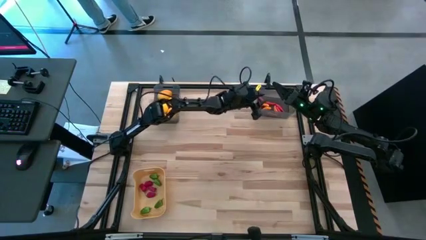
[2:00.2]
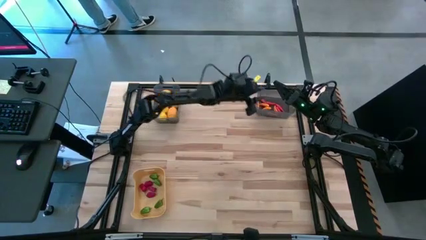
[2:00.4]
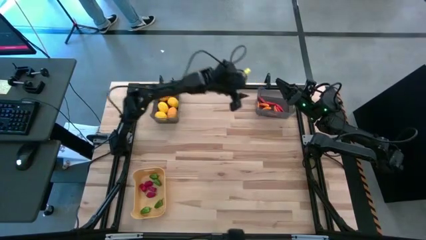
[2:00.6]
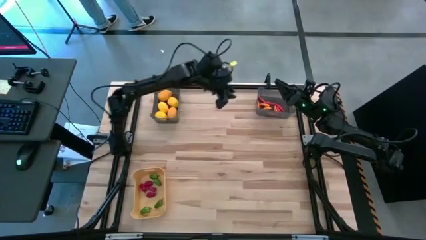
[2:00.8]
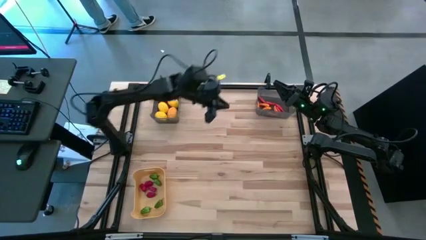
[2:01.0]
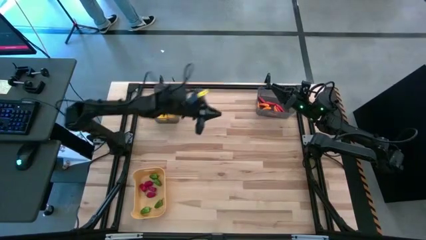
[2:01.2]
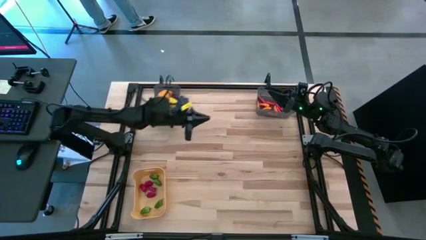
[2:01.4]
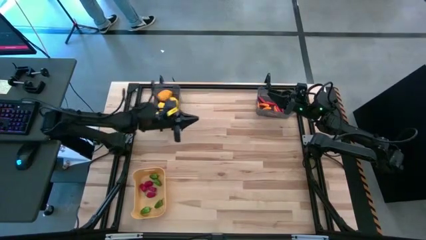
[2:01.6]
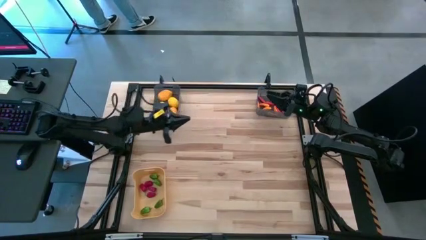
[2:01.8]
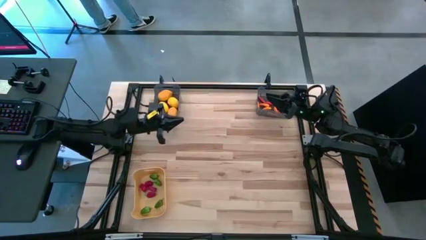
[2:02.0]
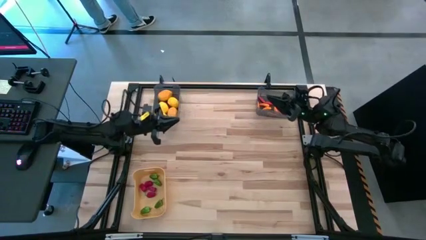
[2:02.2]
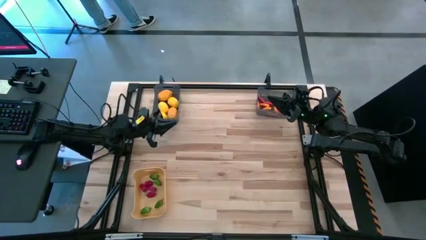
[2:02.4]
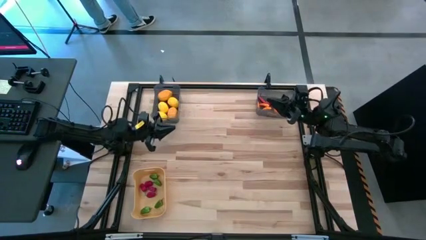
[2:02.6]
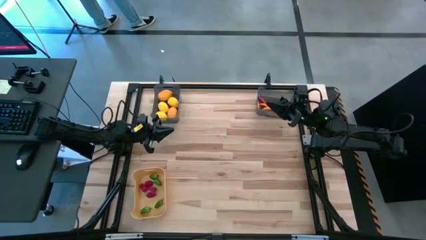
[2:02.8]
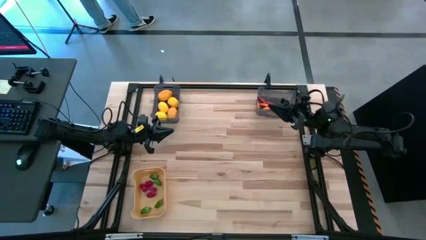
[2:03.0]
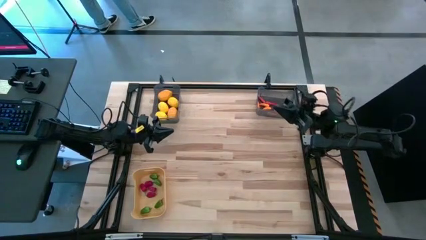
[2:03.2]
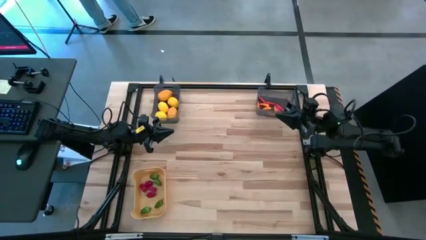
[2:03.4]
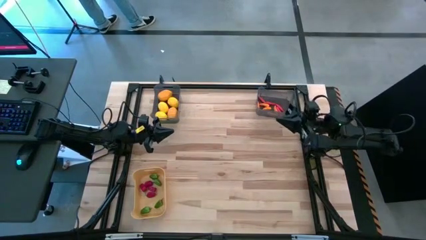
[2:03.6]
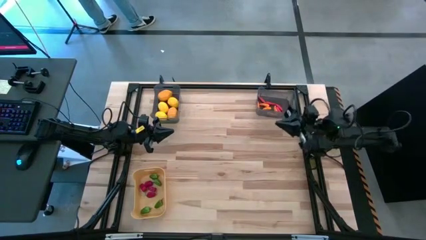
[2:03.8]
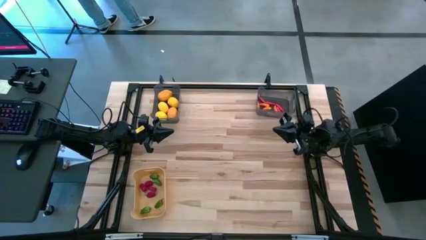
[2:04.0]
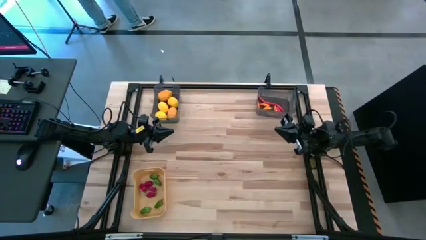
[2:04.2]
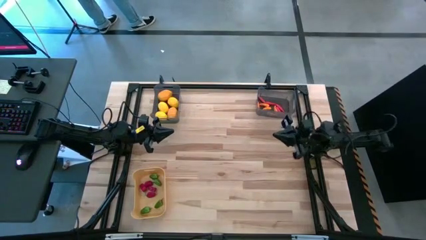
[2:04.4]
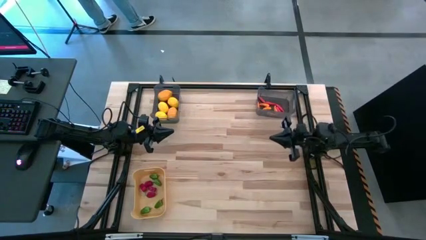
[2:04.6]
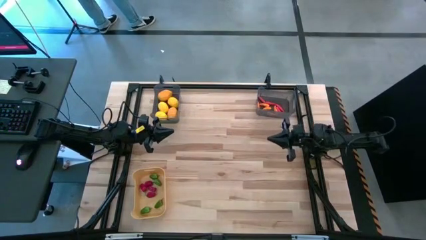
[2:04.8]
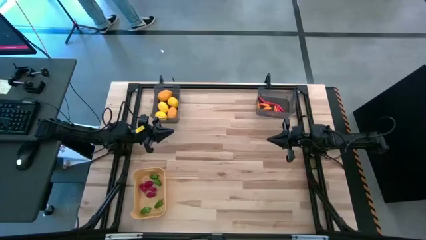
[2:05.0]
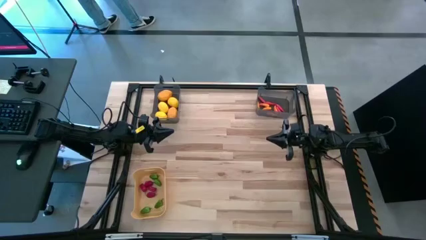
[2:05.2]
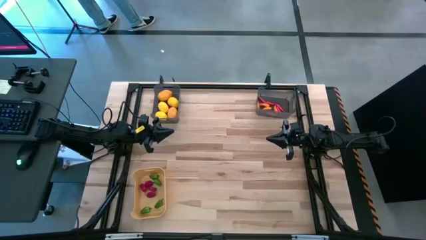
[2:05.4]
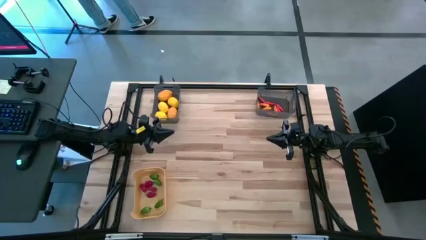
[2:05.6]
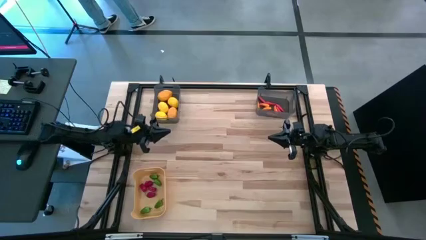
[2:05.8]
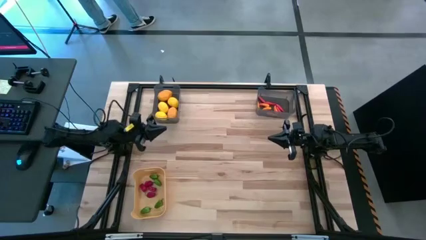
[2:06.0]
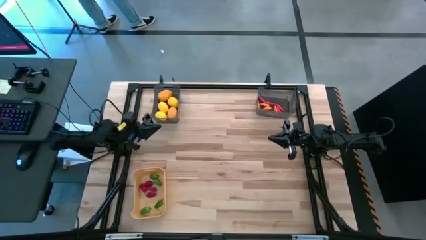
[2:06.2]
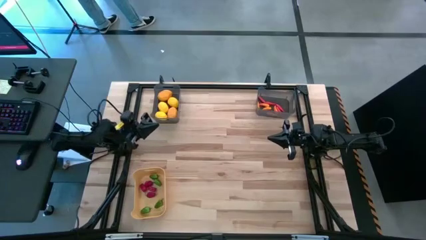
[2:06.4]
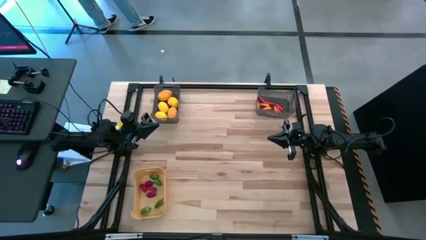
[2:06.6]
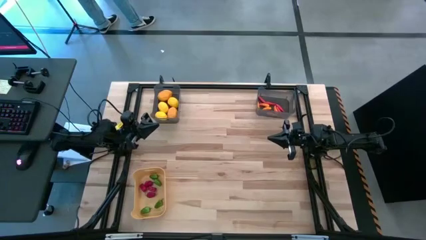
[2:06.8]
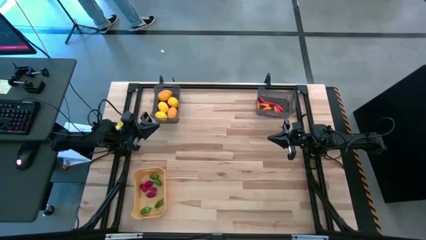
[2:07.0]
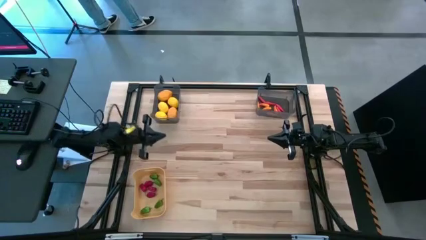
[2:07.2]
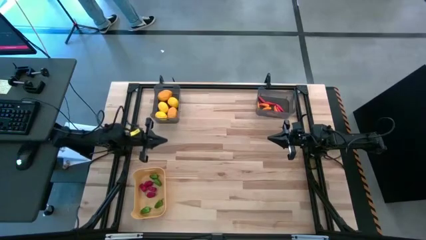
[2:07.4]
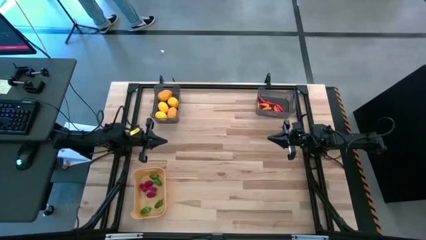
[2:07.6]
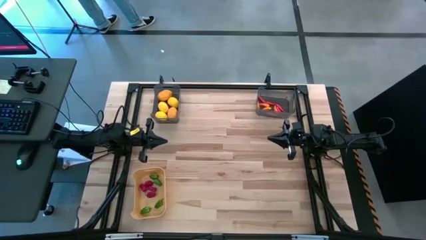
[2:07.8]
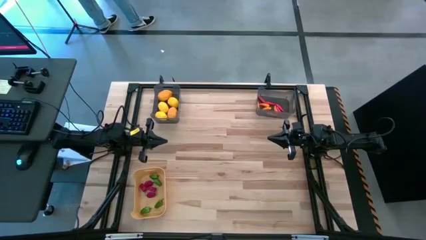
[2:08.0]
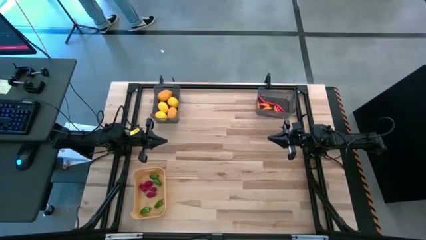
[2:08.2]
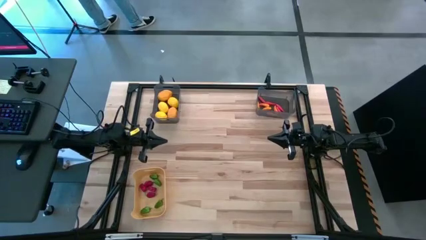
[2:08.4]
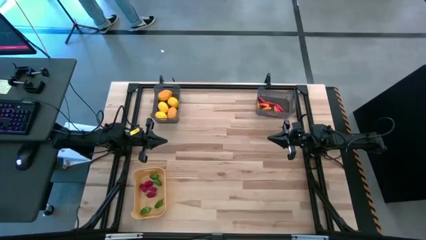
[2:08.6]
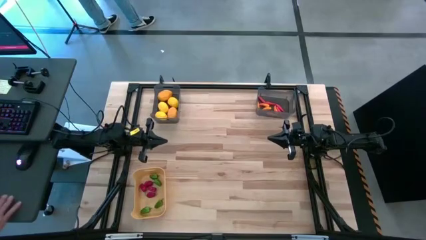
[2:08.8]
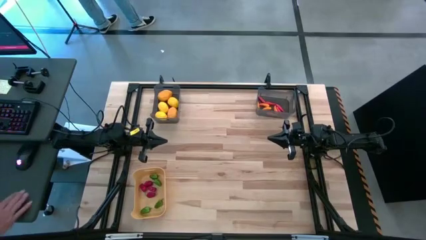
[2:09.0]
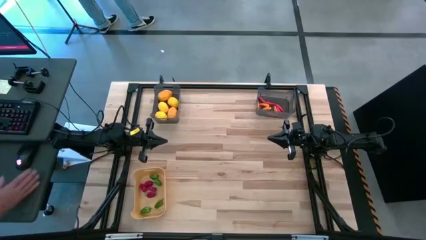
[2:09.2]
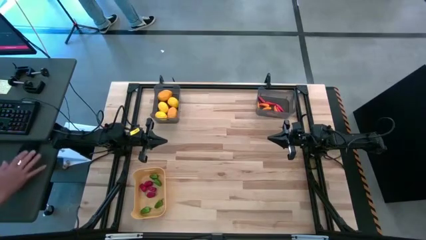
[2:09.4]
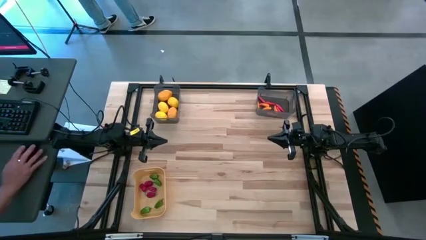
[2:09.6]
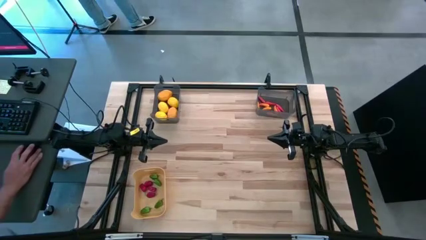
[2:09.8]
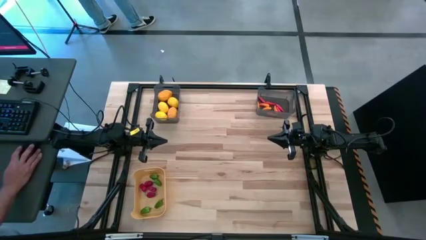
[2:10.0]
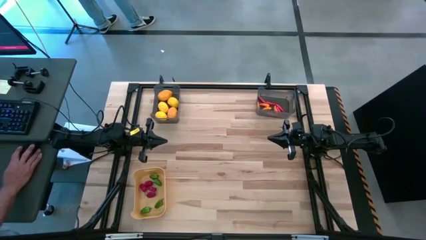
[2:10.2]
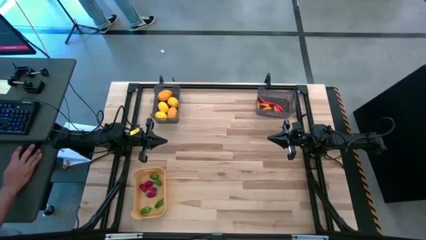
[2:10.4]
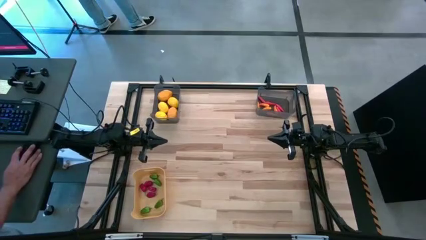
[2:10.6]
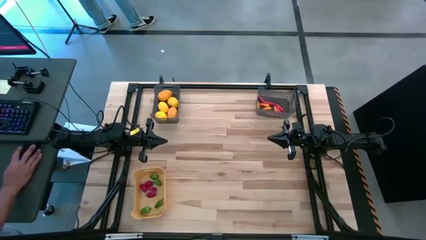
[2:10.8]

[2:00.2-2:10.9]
Task: Sort produce into baskets
Return to Home Position

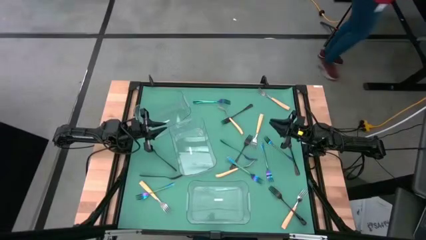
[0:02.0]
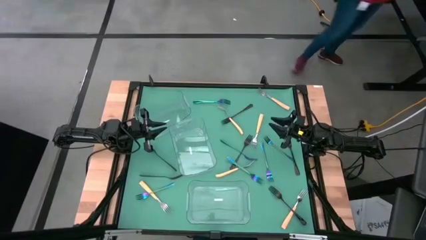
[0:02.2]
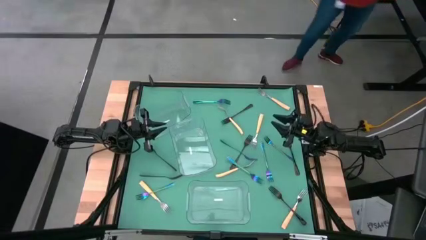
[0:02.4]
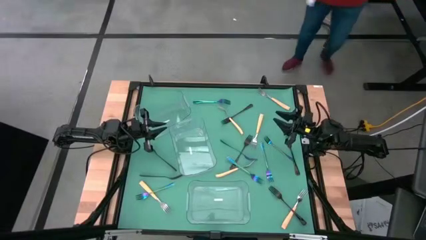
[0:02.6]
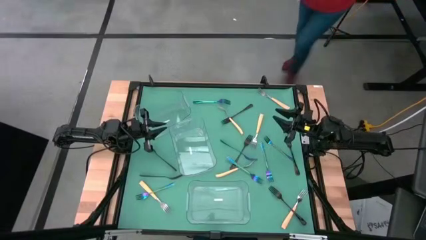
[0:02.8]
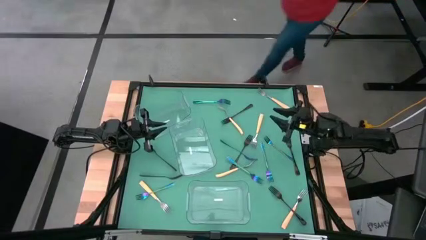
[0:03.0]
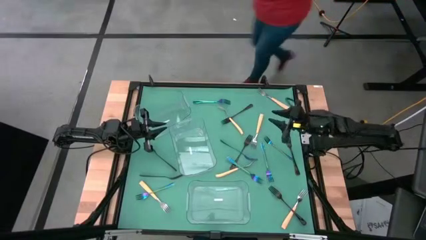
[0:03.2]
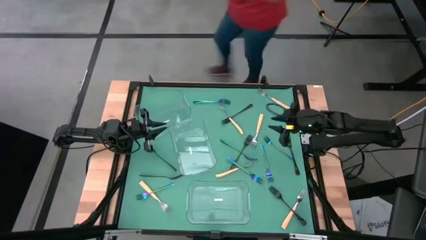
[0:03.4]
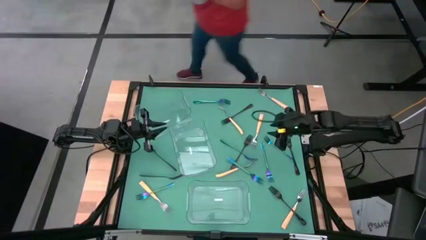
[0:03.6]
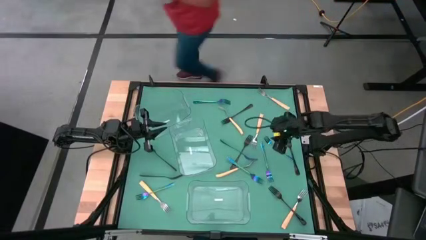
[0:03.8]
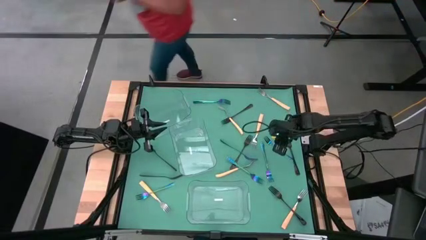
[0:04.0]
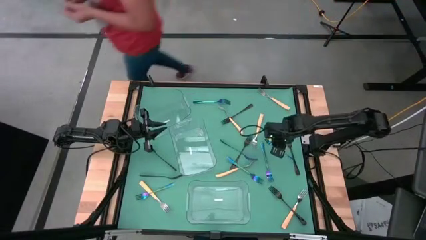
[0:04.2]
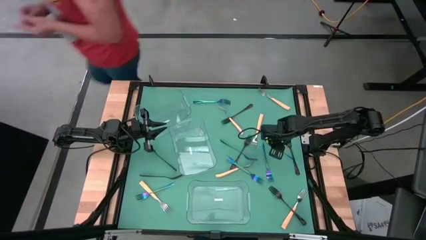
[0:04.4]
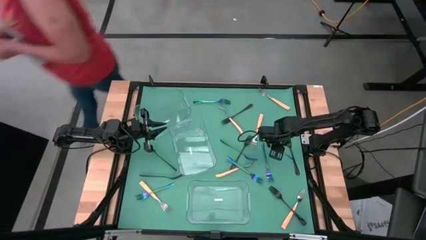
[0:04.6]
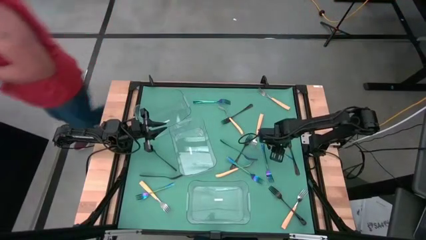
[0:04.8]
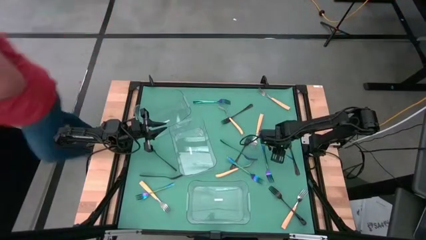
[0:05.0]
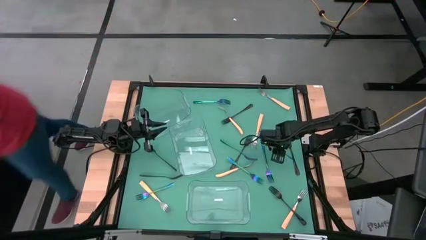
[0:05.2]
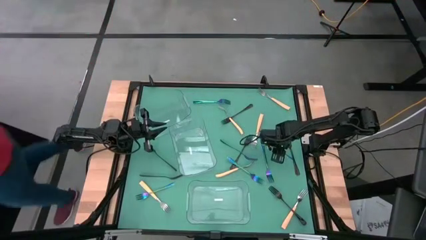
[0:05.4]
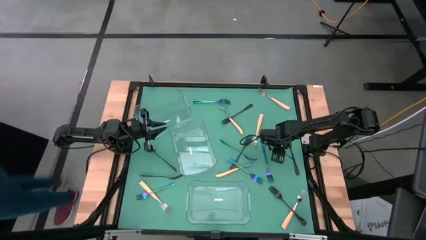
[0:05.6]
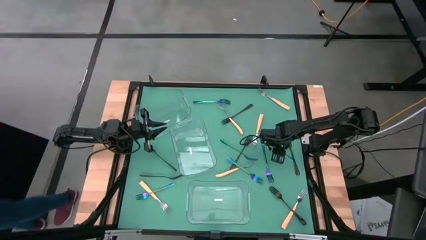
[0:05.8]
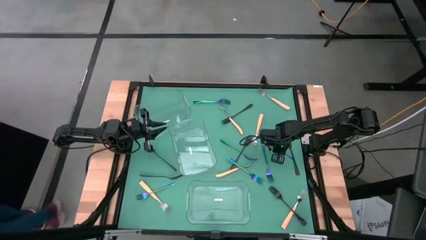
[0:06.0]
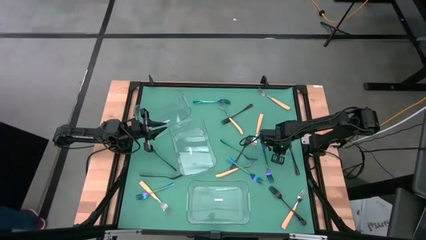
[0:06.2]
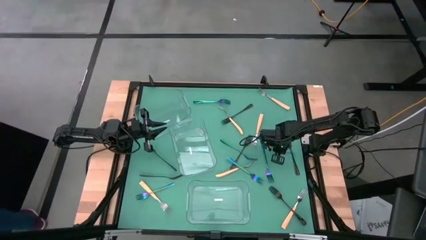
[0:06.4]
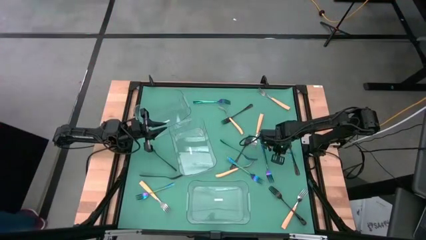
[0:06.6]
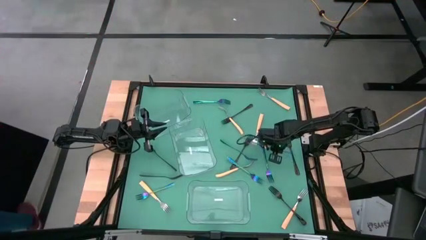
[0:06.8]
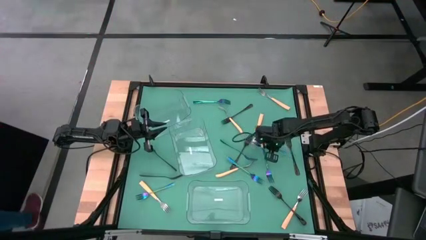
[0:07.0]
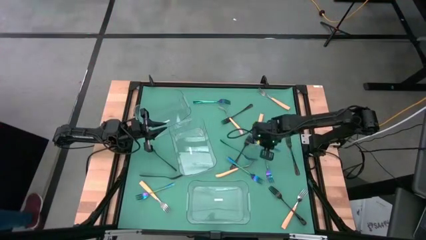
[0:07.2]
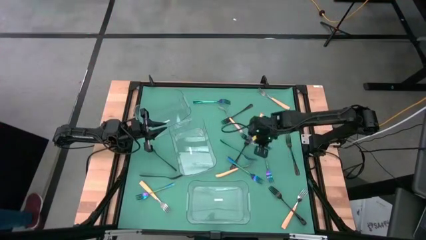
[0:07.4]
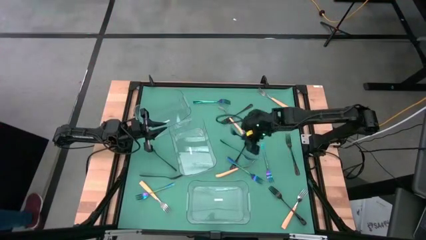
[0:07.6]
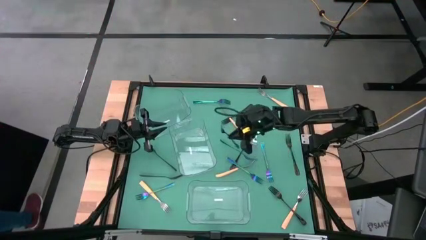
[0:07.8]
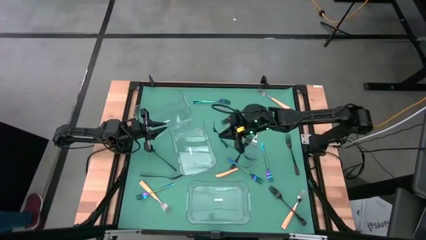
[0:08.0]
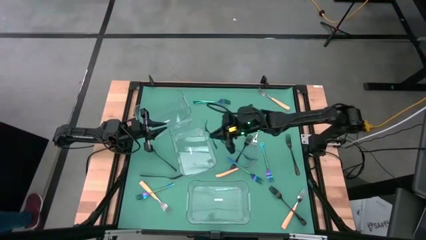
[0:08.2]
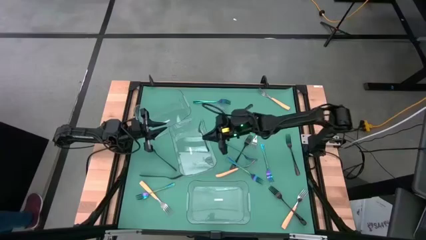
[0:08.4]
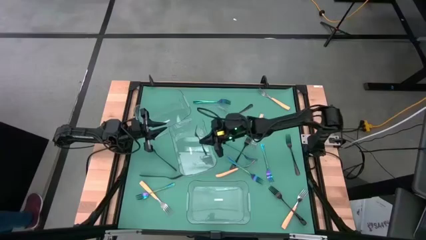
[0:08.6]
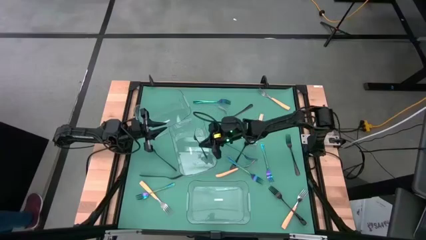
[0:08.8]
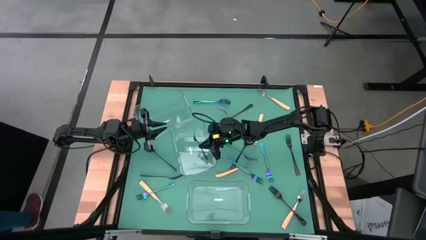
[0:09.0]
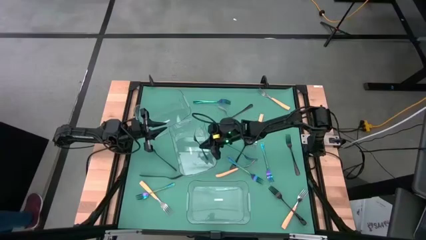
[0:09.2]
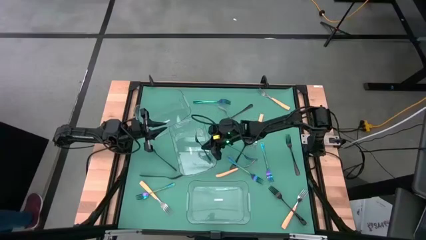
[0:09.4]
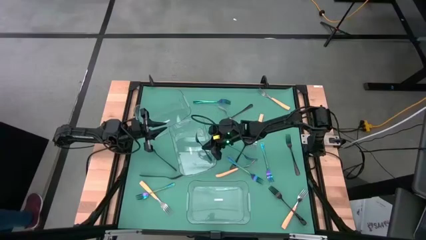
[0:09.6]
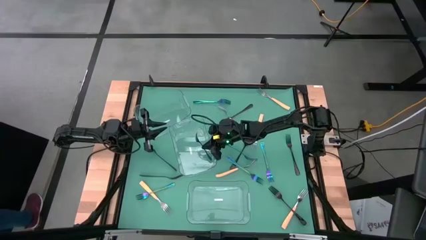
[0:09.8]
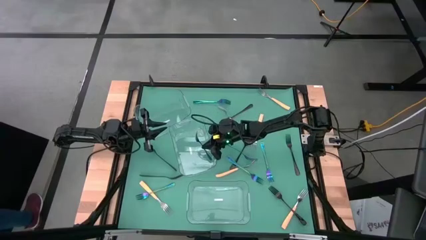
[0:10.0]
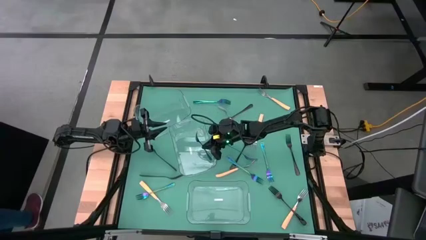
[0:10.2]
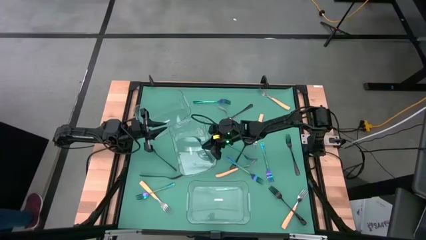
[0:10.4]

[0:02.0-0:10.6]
Task: Sort silverware by color (type)
Put the blue fork into the center transparent bin
